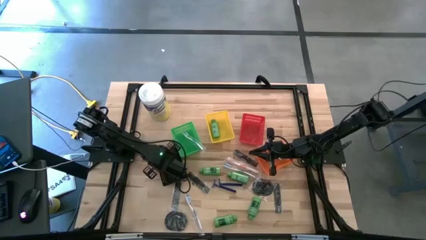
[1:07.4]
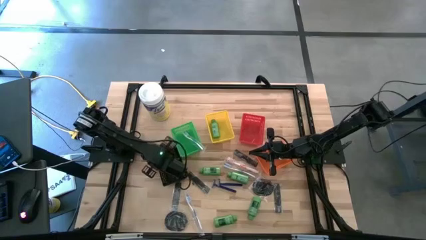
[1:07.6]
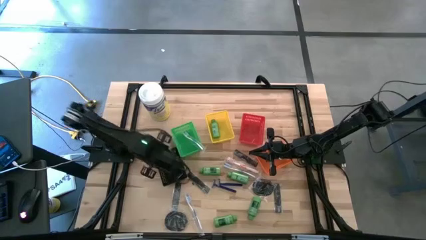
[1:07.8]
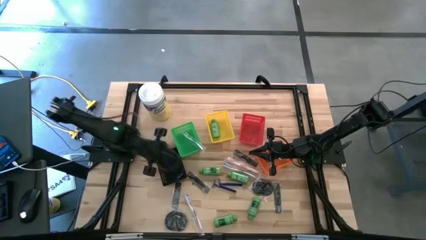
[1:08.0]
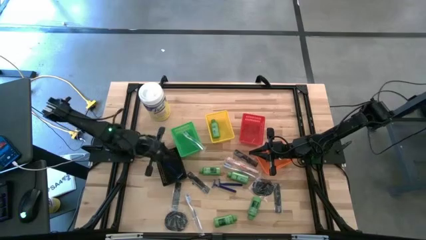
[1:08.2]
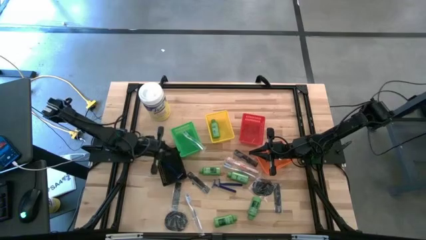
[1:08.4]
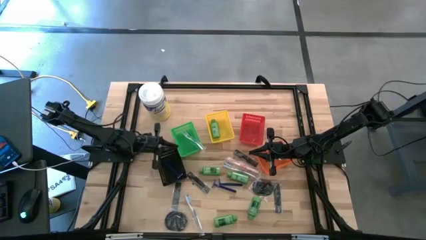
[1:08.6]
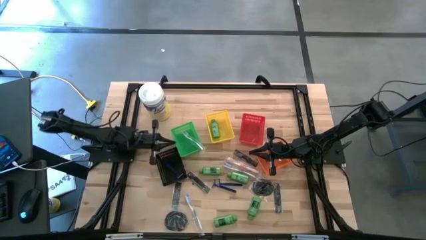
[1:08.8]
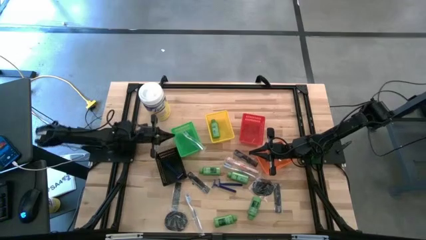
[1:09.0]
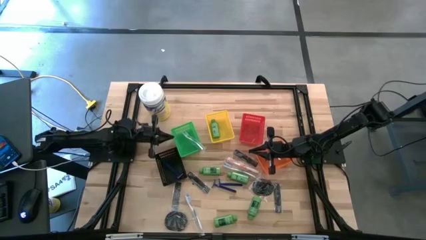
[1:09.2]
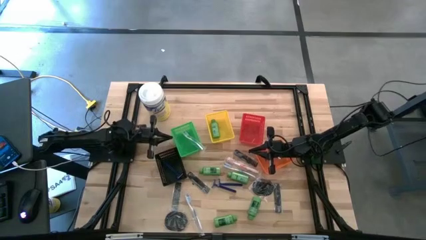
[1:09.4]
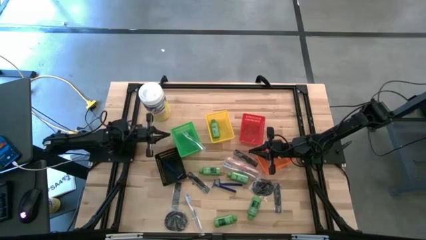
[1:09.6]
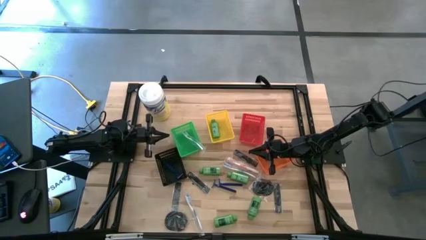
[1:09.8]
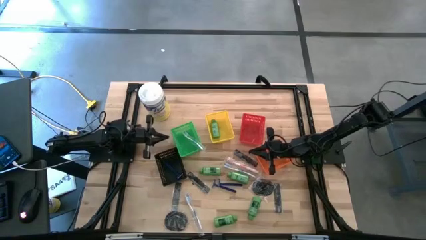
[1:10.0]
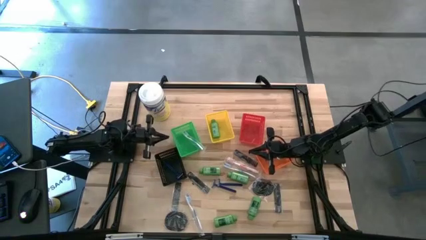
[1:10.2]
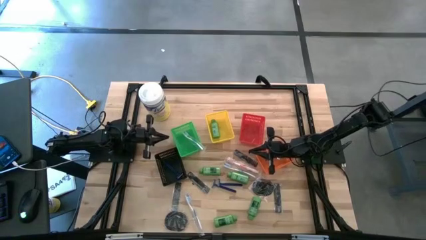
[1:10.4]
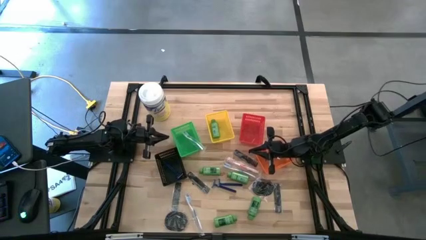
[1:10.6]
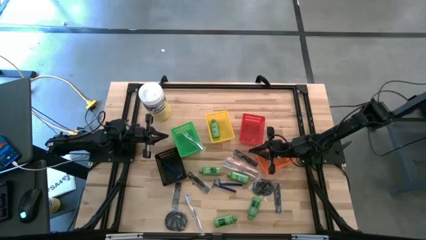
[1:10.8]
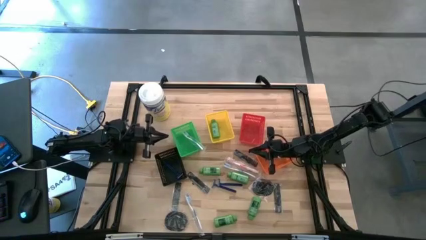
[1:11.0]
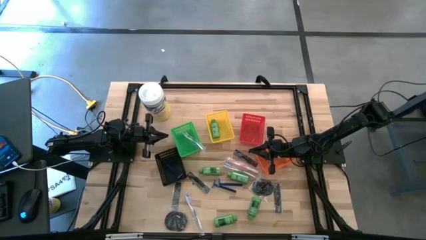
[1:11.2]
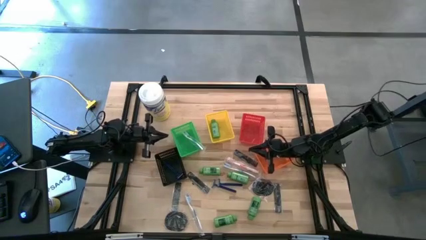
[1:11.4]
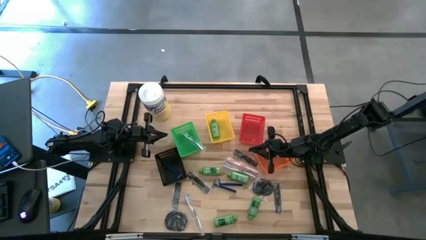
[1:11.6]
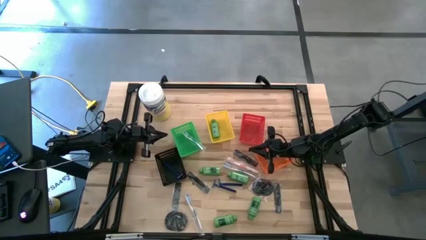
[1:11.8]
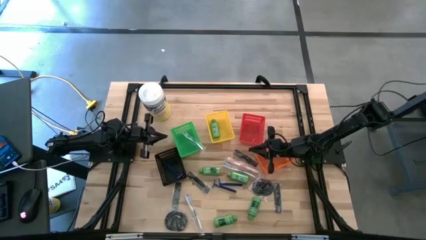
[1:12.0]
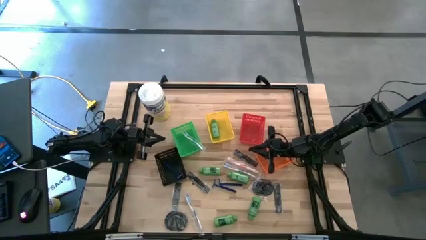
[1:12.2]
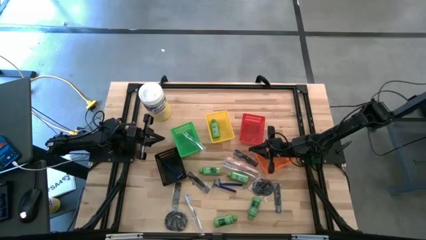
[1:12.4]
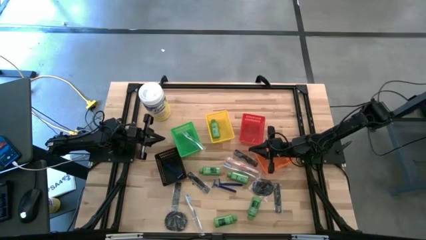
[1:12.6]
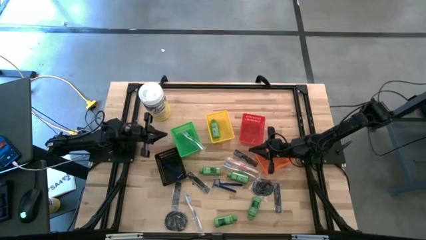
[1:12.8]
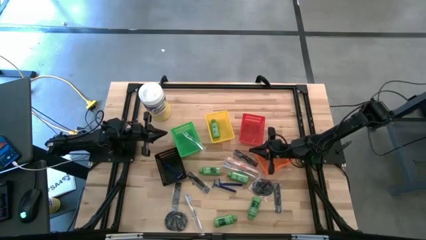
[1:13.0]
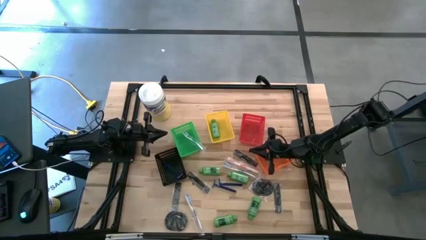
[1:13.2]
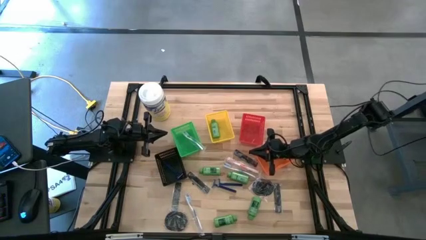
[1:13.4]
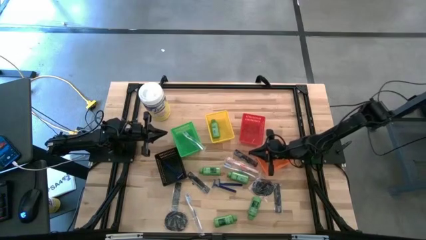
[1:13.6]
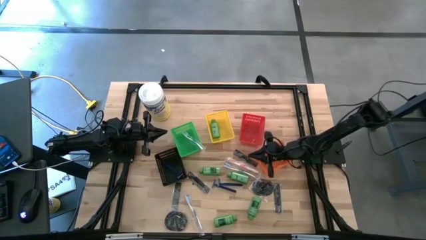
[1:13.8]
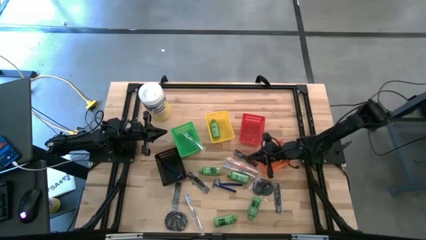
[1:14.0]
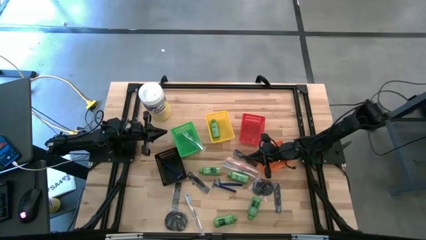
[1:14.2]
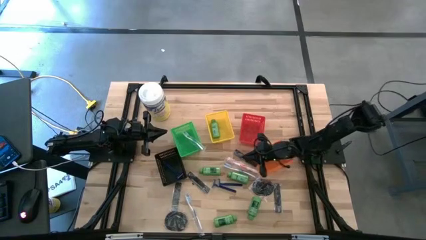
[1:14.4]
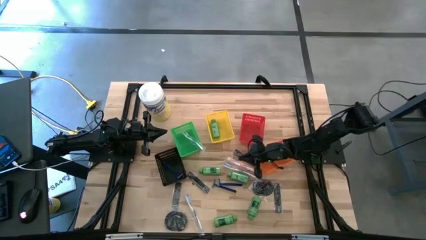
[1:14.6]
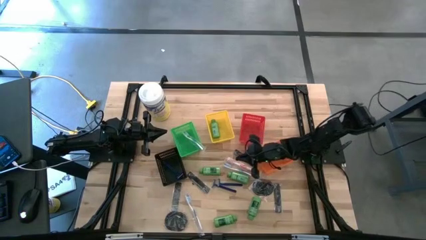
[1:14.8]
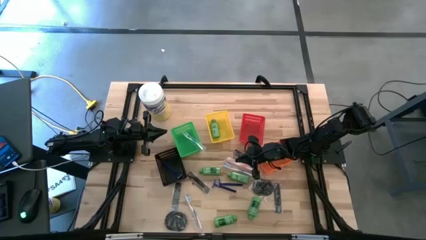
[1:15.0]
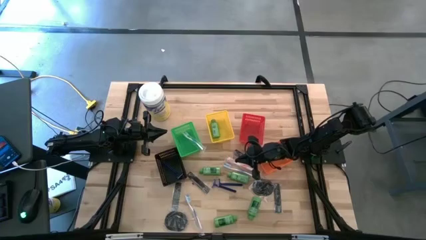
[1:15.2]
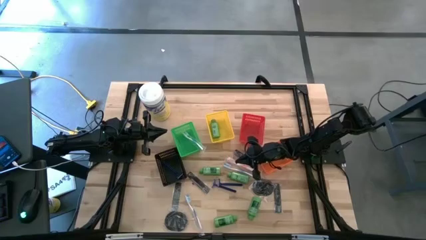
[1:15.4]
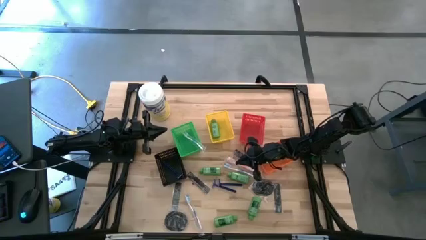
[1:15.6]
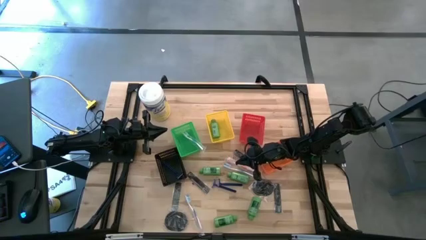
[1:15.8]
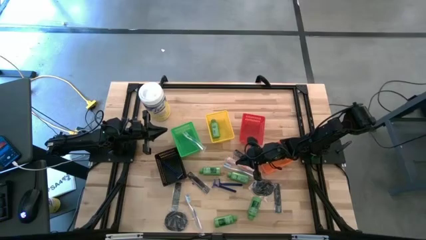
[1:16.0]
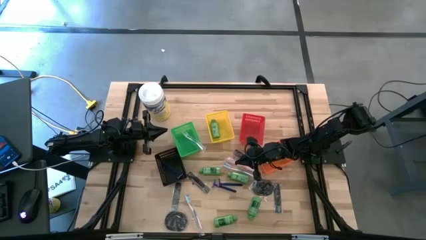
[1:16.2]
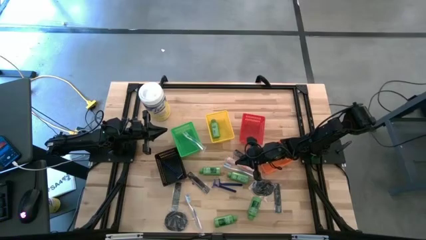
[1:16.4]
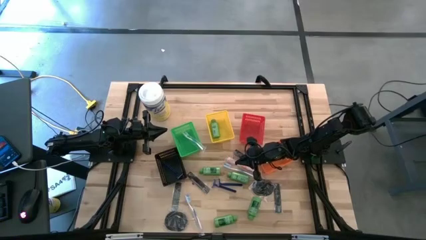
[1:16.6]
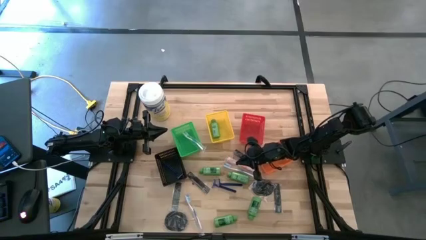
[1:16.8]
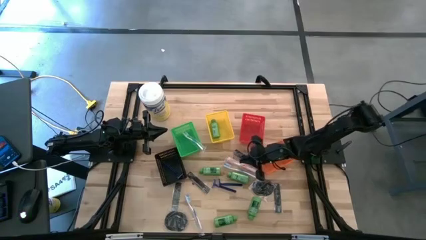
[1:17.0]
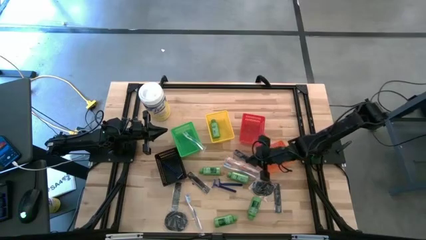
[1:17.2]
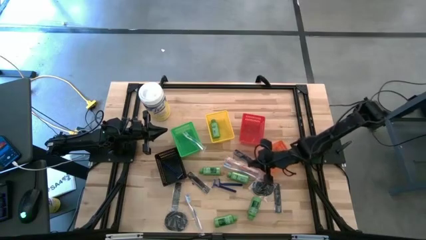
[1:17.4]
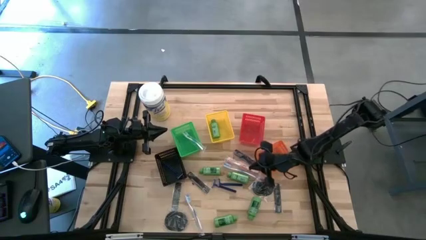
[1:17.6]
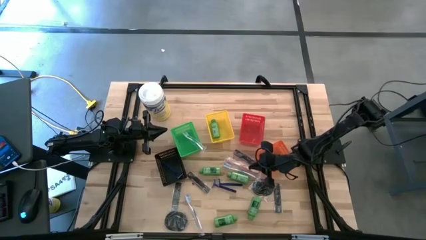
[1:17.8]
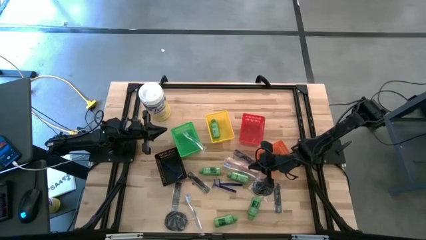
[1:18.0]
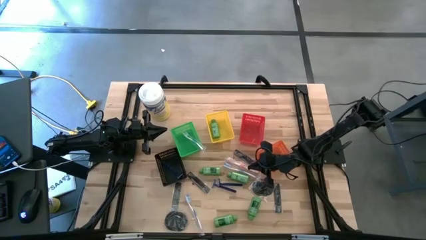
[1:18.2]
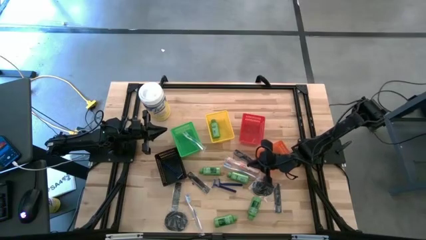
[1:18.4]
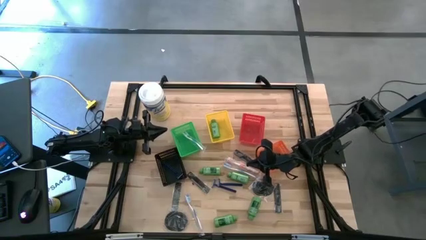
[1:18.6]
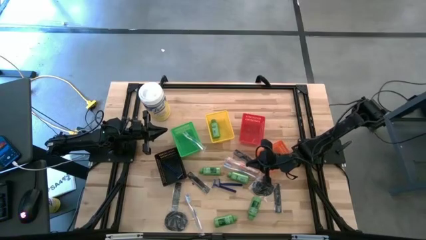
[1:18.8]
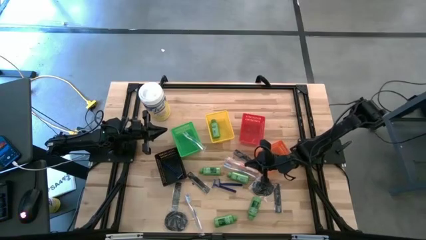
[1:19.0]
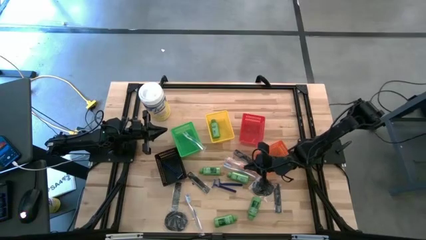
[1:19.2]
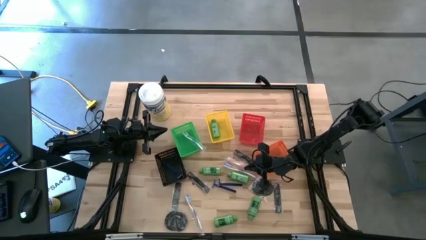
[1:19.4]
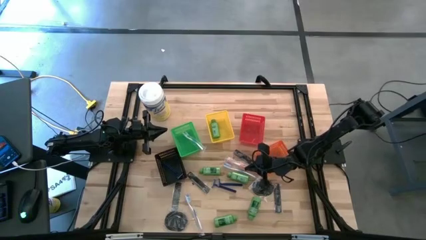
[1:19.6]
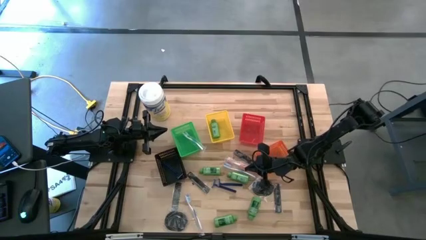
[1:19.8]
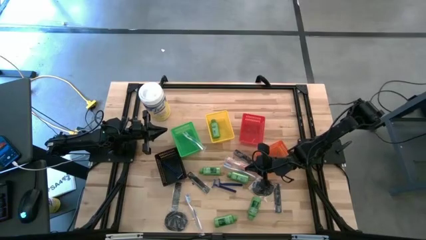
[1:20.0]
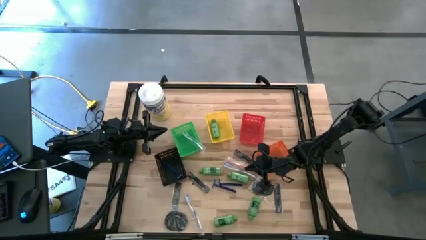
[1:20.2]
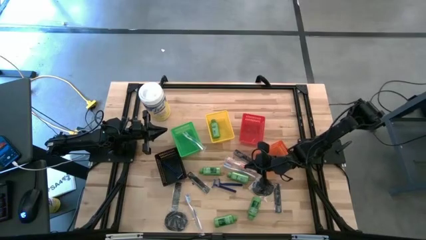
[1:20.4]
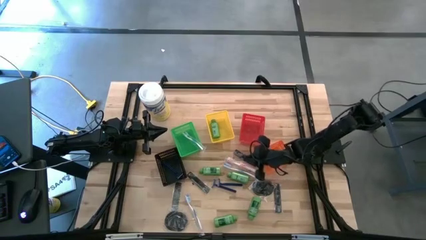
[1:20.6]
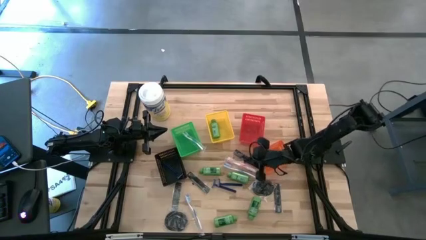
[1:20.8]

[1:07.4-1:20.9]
Task: Pick & Place Travel size toiletries
Put the black comb into the red bin
